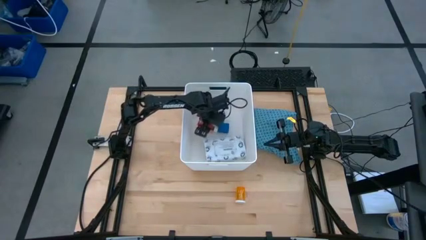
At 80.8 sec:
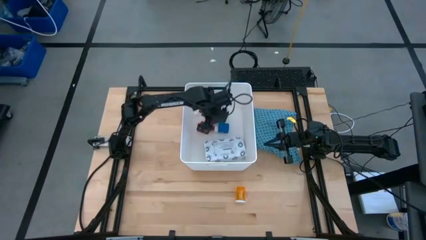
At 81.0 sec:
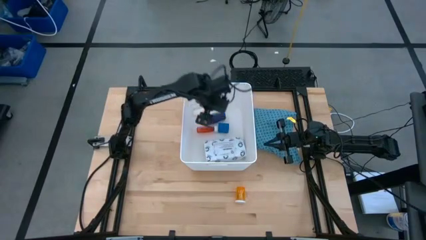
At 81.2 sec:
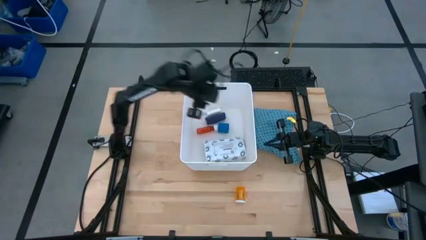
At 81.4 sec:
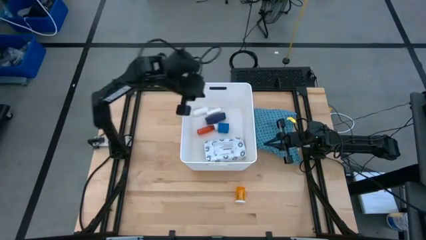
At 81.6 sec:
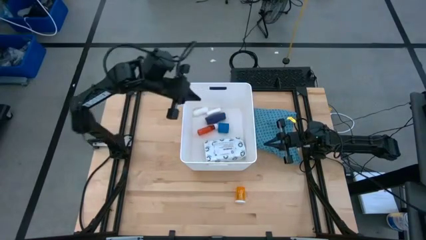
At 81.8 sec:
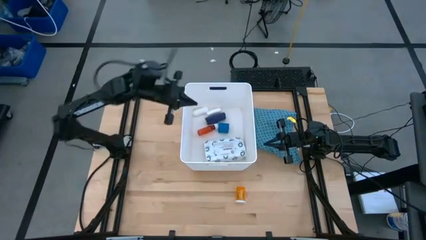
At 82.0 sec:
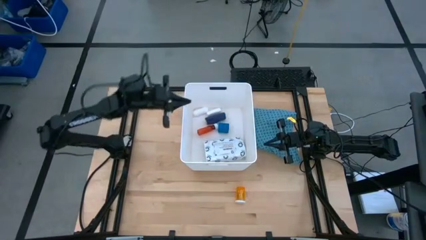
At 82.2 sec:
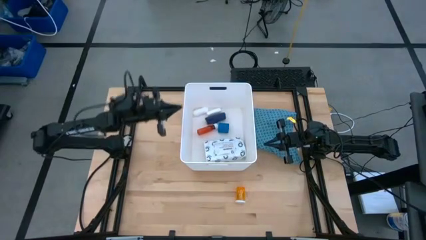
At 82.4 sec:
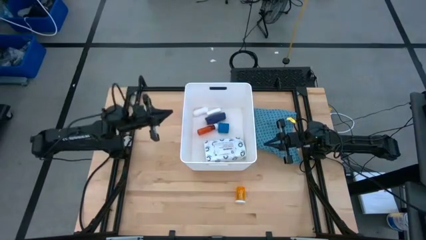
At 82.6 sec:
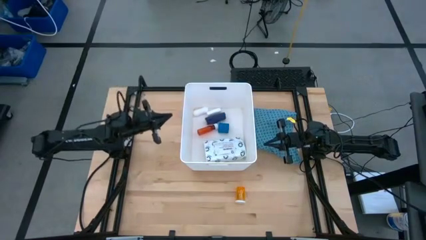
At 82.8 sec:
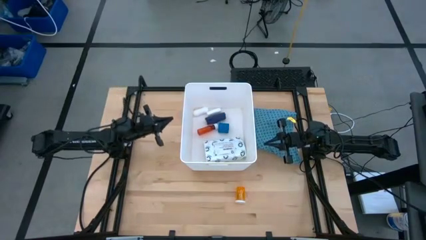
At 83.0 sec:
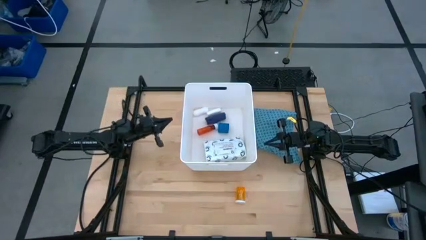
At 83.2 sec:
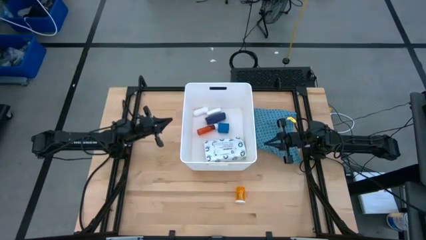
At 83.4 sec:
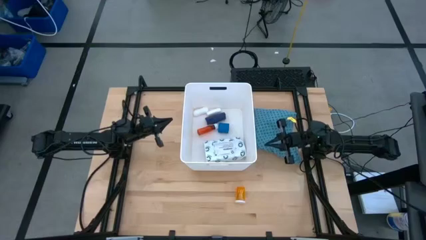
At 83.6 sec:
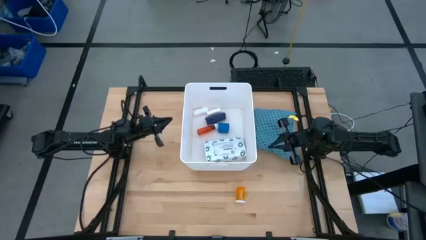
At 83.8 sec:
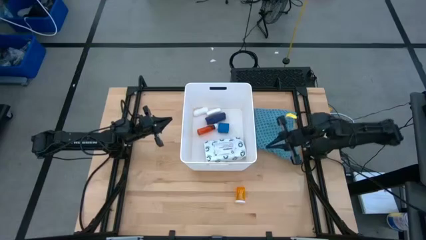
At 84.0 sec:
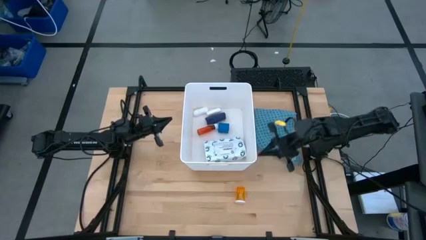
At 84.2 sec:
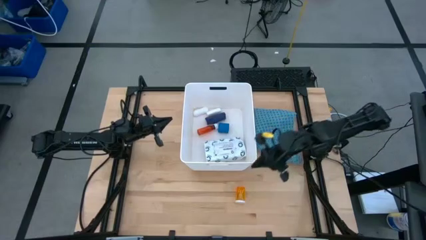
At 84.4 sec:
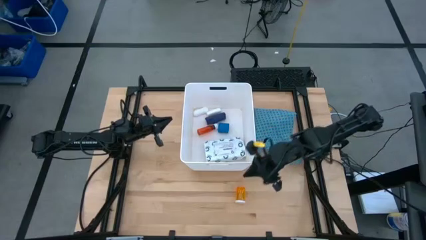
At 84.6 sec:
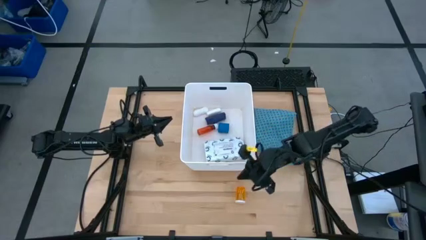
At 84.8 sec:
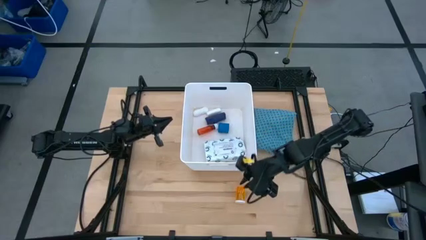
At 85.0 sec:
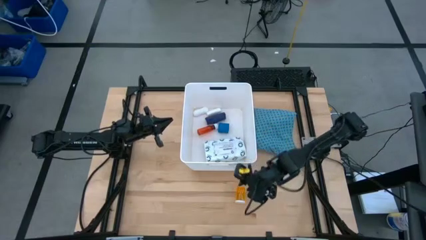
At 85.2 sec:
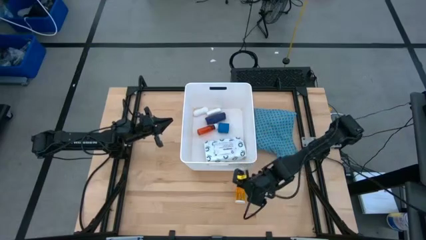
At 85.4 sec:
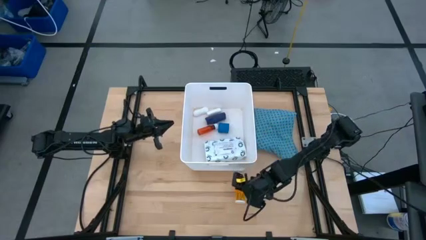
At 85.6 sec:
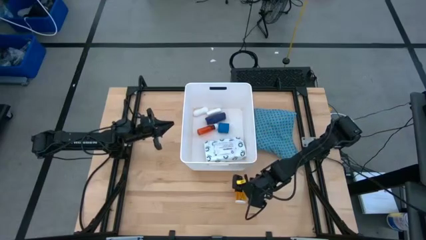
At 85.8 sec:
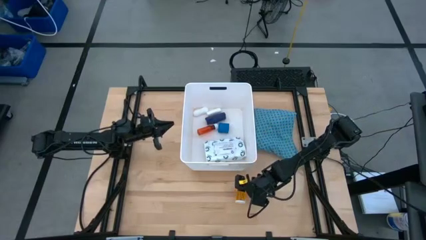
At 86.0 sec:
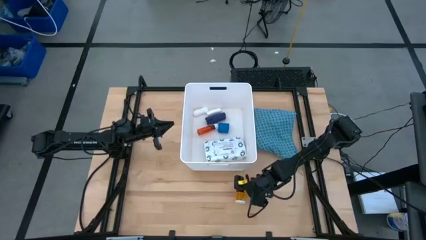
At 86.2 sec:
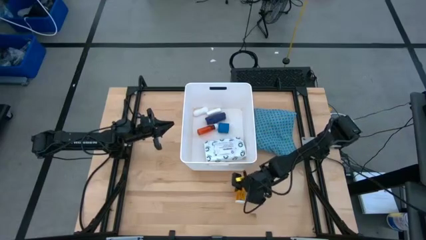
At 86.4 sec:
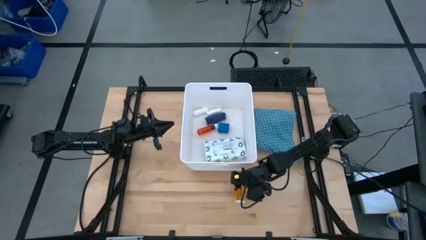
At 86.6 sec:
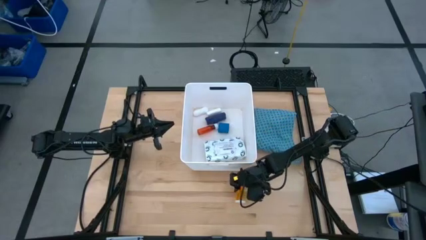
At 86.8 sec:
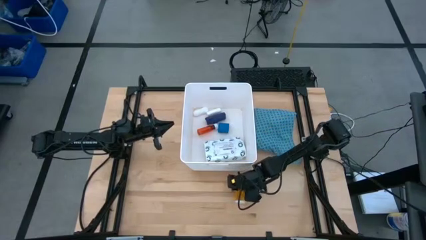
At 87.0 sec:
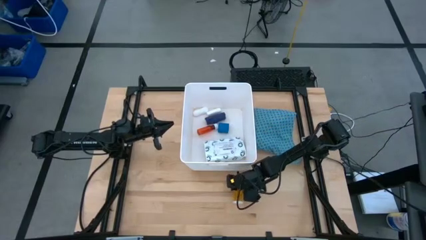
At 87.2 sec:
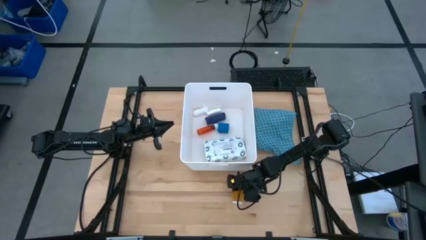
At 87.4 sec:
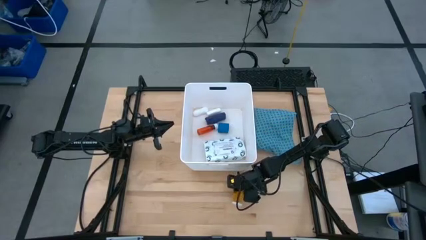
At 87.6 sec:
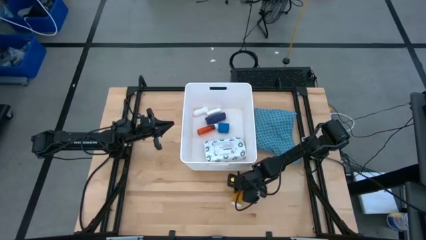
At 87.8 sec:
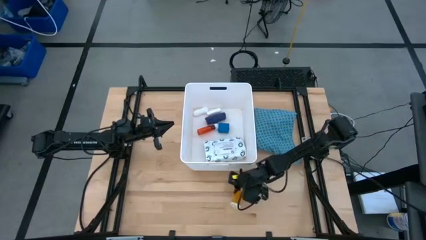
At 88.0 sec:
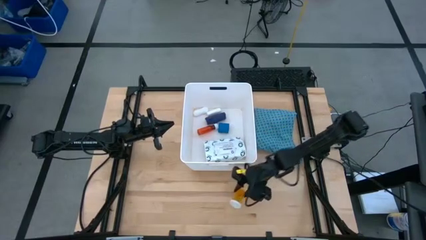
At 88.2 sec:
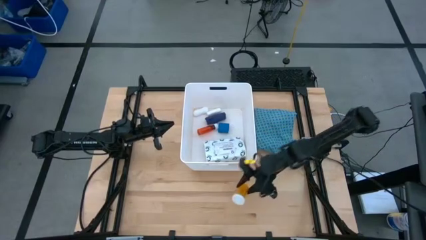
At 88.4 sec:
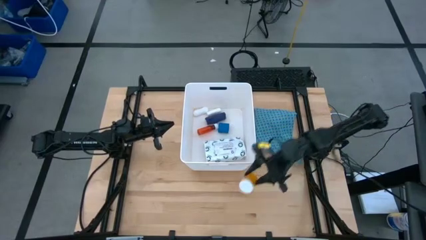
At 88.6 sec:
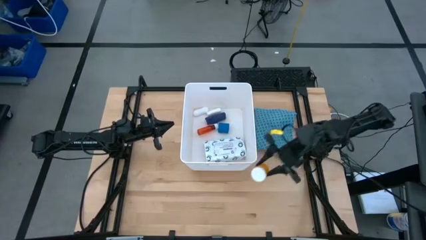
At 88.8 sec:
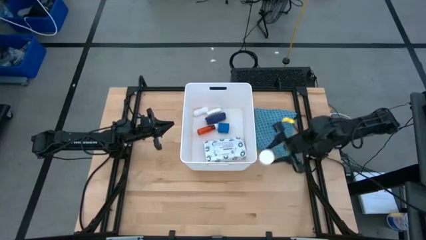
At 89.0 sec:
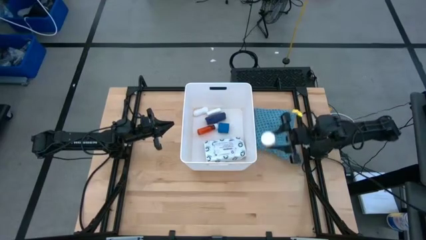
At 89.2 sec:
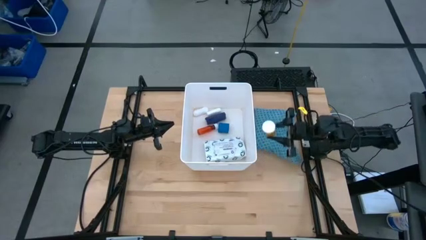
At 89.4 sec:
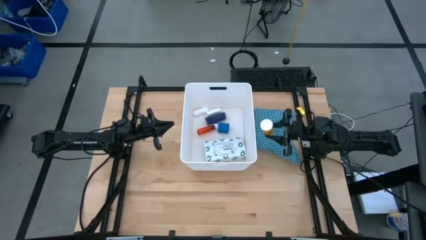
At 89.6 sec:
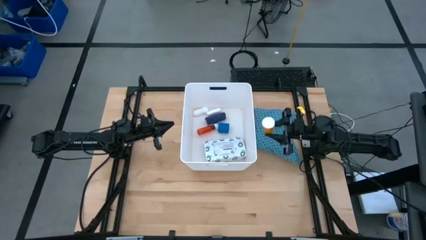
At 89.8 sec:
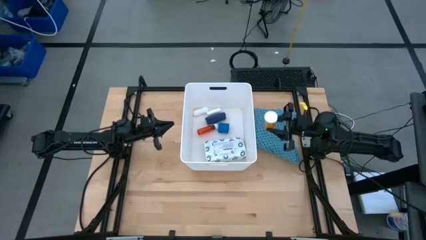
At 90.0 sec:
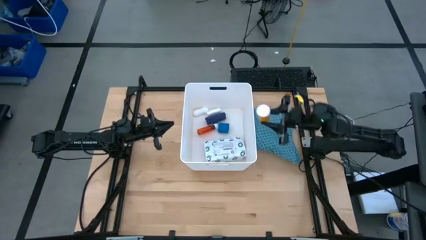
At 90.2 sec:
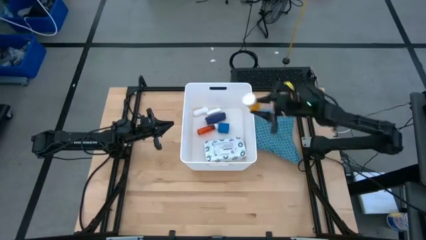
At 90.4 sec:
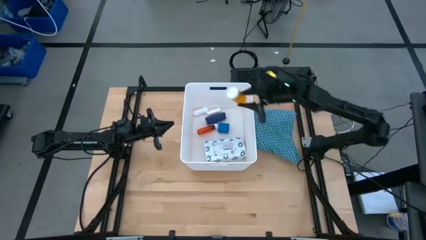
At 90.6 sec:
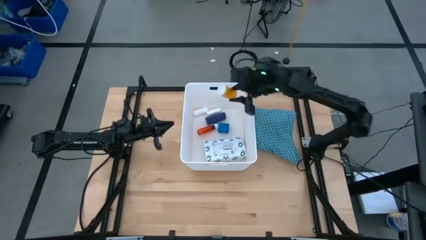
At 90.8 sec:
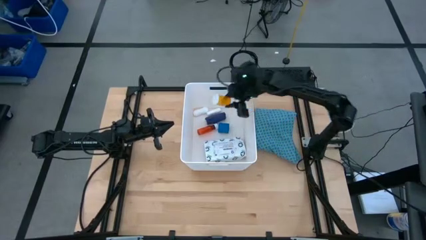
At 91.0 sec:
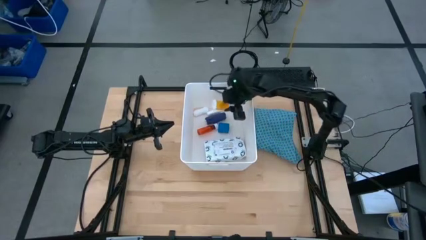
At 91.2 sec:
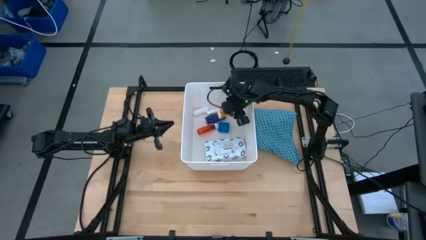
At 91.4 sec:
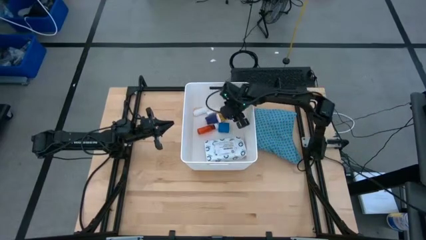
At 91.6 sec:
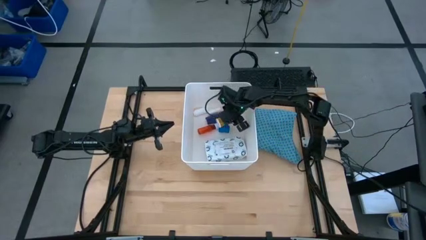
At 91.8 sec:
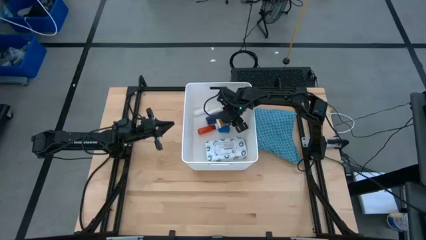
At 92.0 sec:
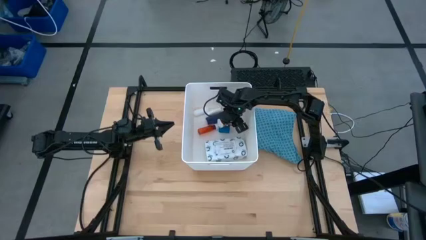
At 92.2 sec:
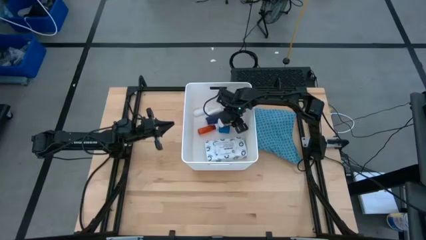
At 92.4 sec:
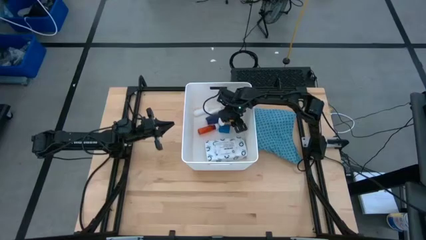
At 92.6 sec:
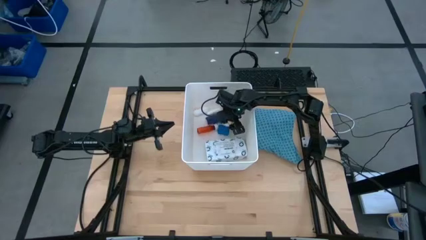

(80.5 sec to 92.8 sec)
Task: Pick & place medical supplies in basket/bin
Put the orange medicine bottle into the white bin

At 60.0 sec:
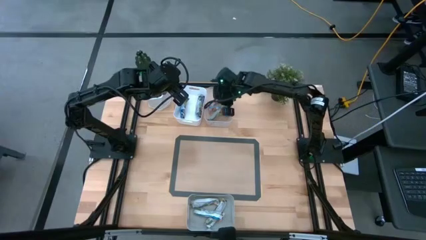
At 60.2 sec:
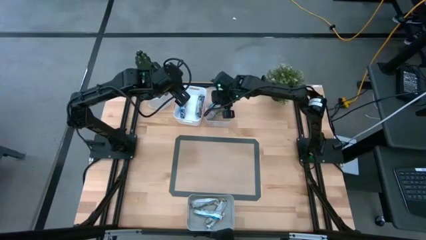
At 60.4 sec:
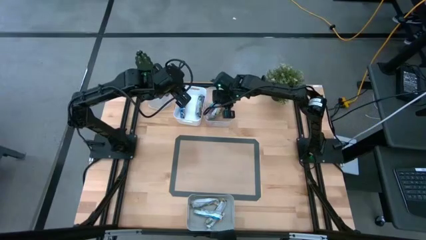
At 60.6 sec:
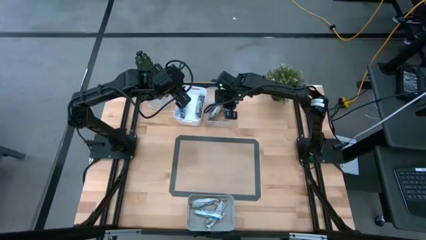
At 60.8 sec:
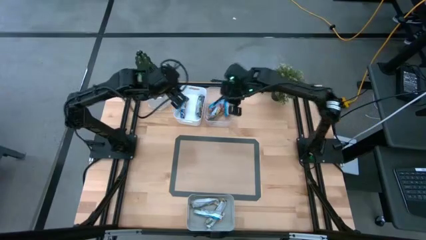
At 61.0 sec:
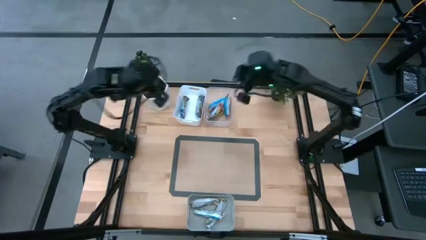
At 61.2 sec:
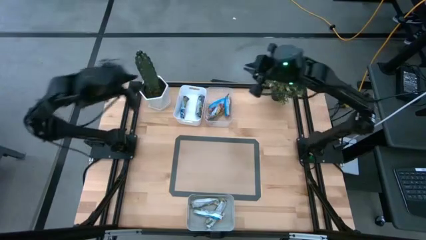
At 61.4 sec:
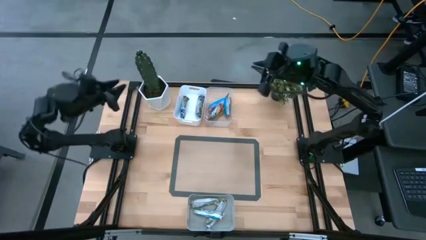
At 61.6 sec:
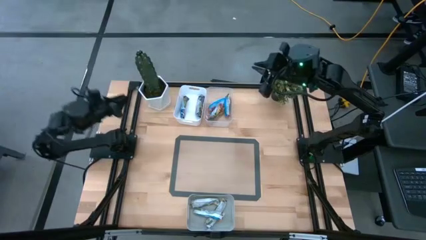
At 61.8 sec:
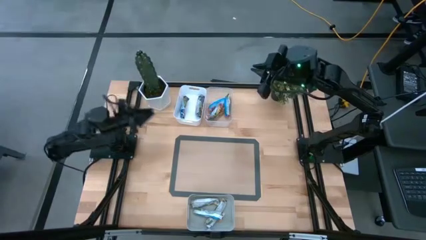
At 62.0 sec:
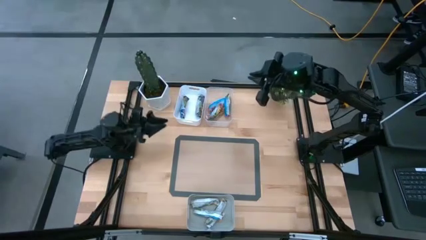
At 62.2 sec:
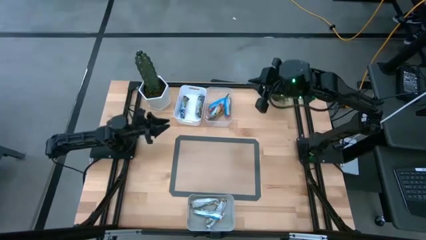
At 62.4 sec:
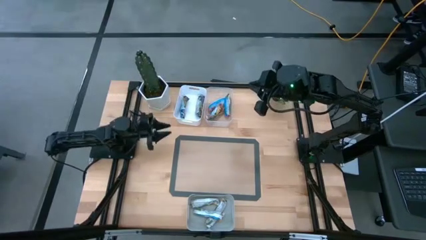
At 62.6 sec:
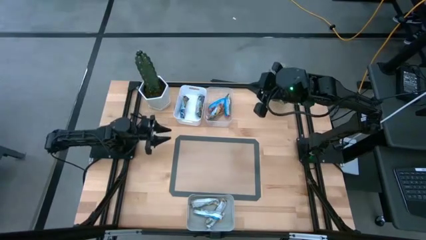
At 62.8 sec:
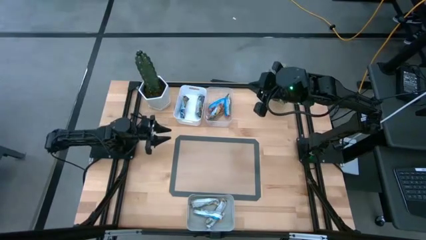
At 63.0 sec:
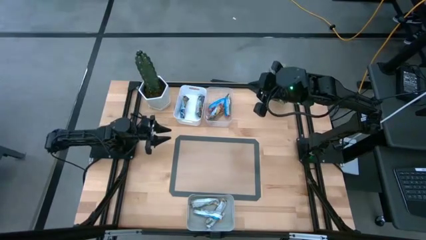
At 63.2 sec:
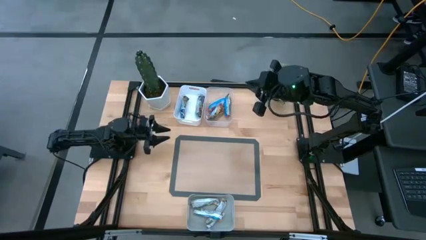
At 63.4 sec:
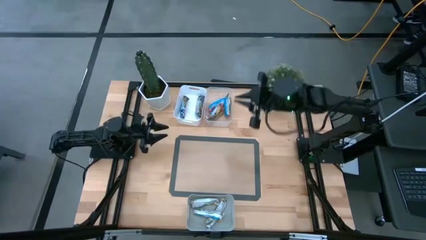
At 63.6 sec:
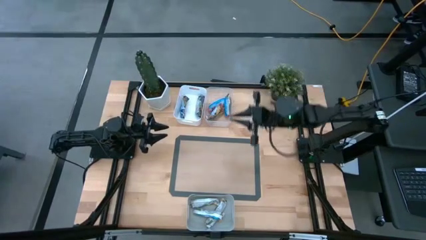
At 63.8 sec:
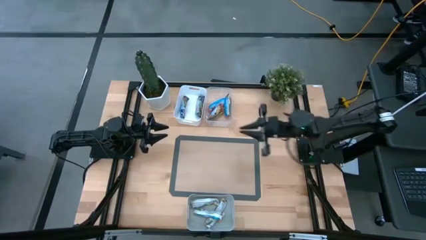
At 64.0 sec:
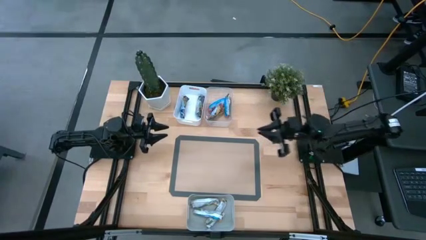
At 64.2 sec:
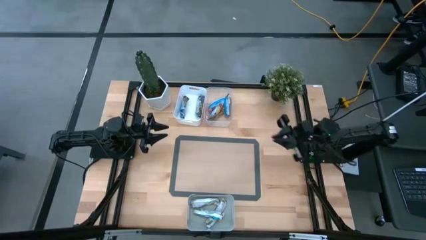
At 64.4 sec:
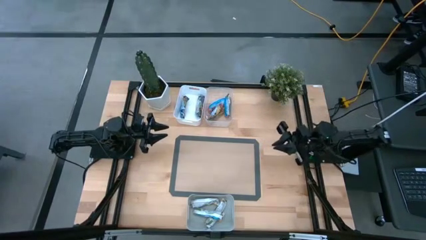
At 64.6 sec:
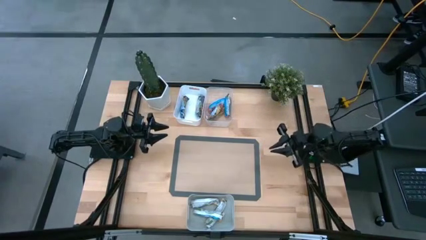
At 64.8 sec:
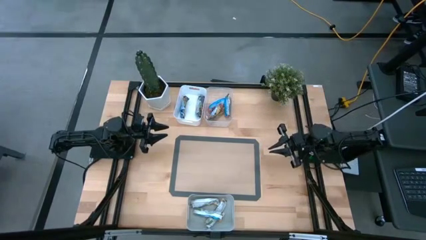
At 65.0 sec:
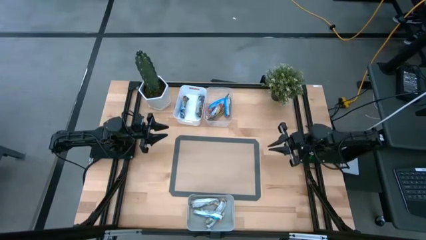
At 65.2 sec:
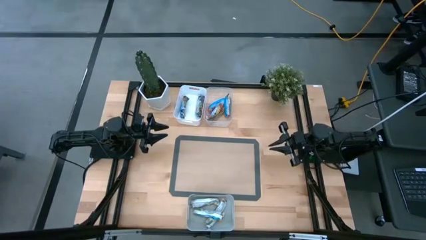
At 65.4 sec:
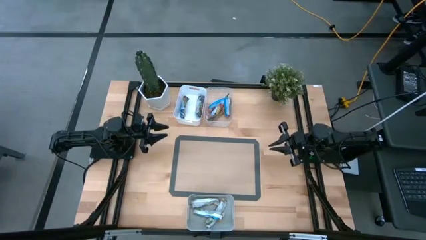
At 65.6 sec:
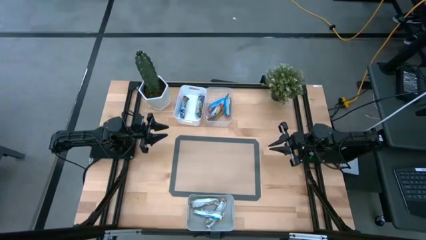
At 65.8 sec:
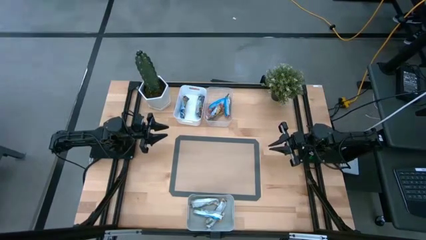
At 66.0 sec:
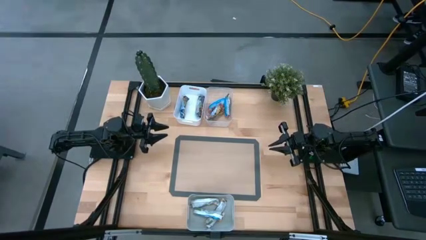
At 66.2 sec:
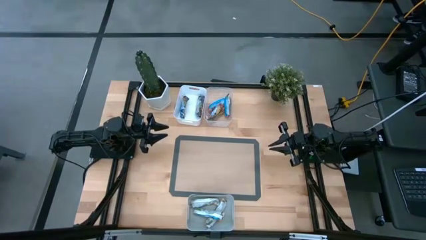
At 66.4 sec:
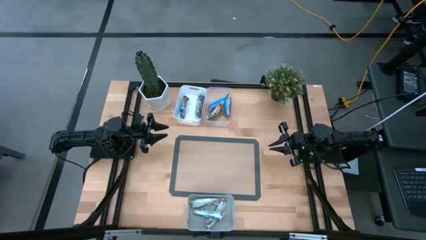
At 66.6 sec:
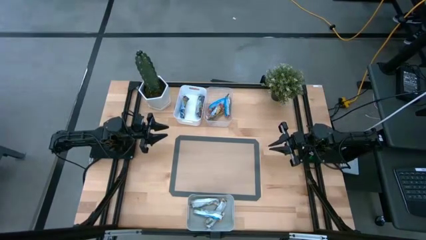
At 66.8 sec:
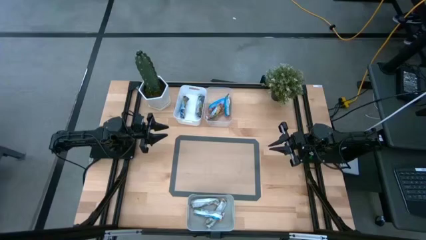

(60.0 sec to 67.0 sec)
Task: Pick and place Granola Bars by type
Return to Home Position
